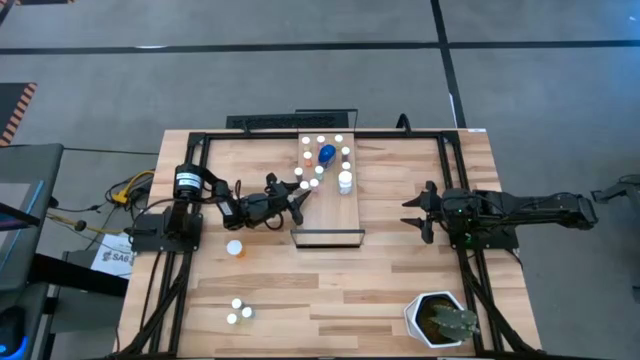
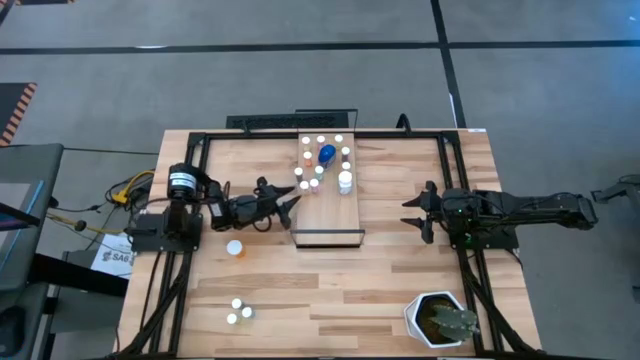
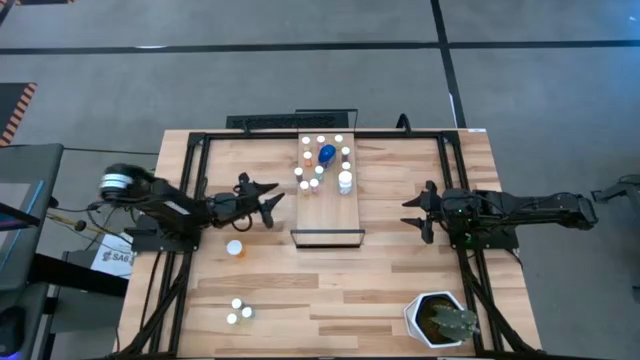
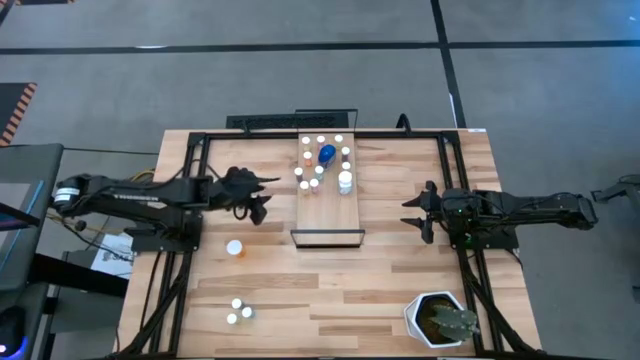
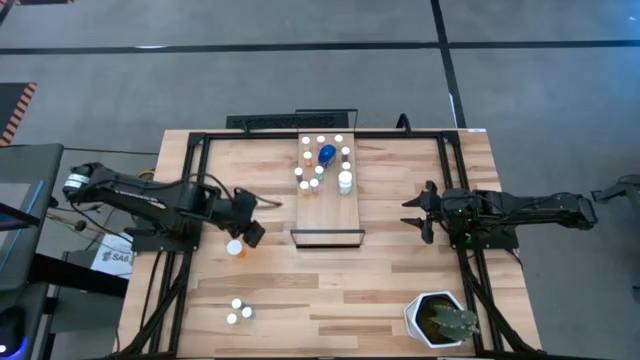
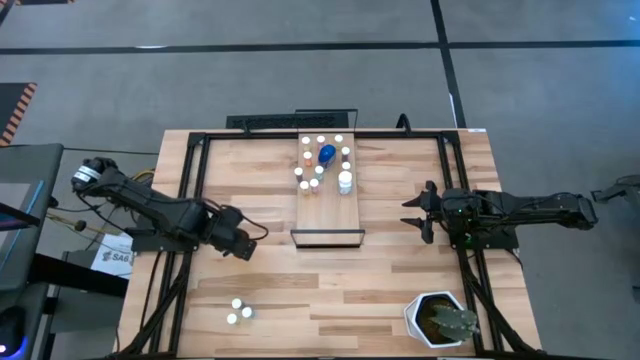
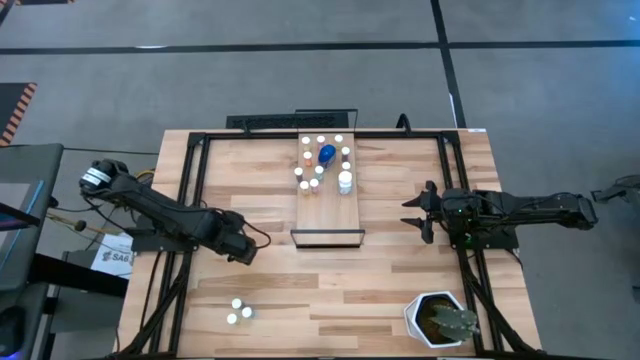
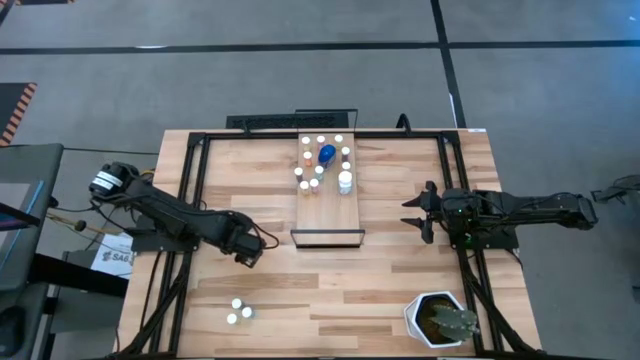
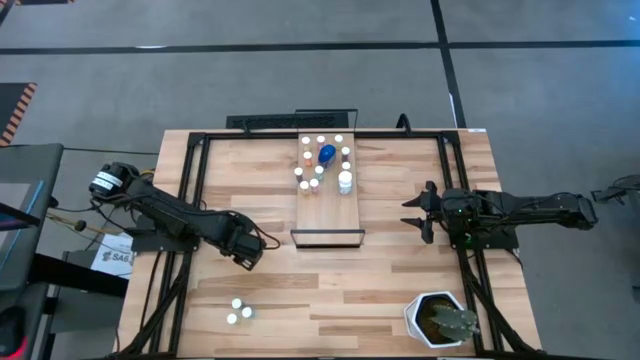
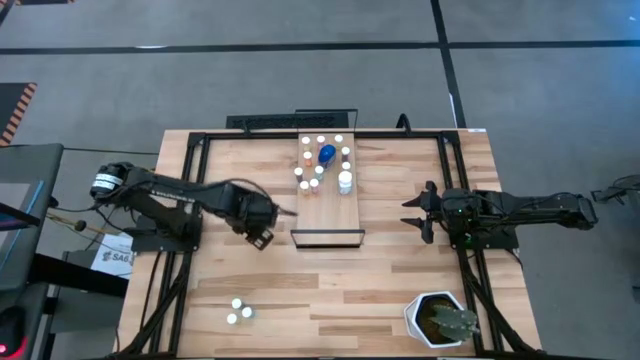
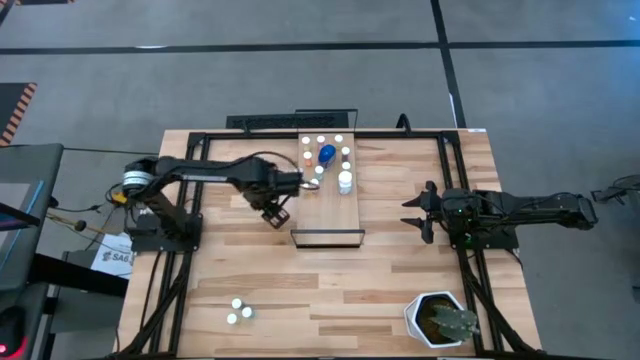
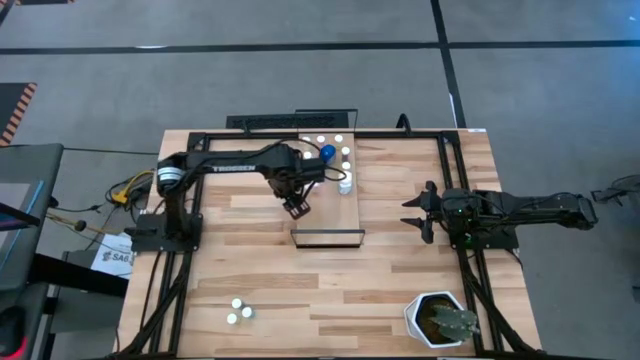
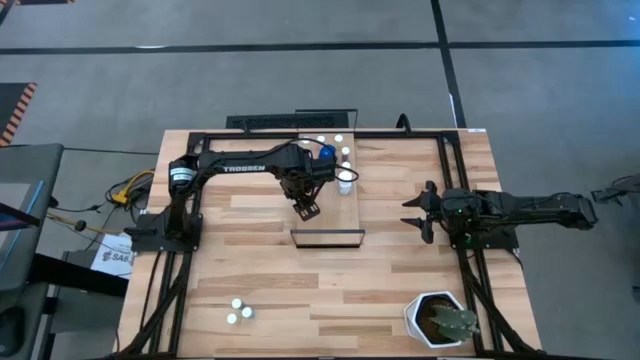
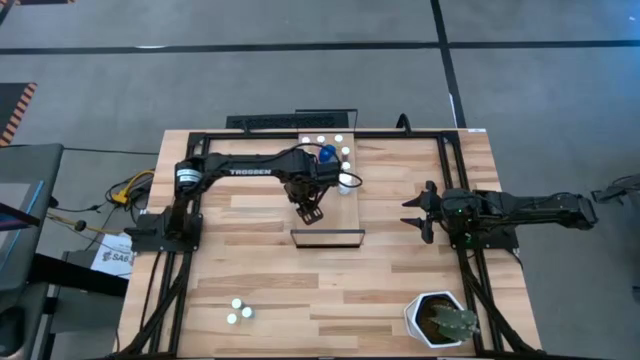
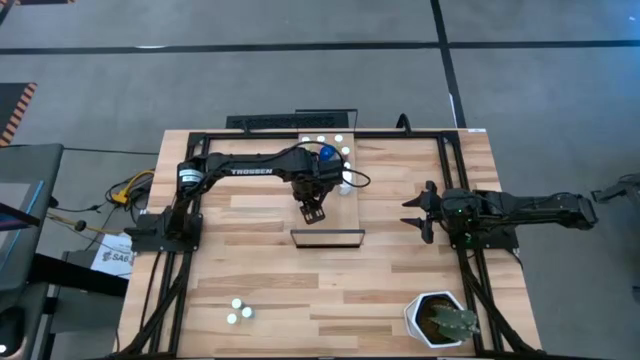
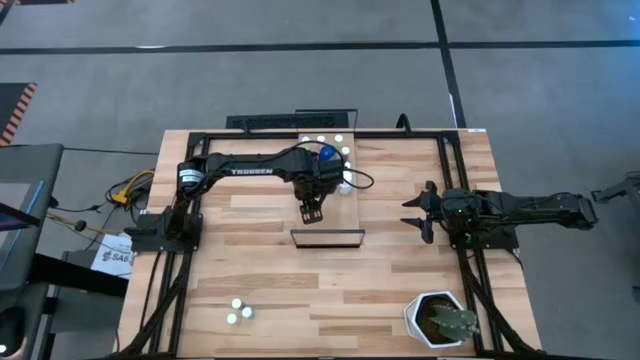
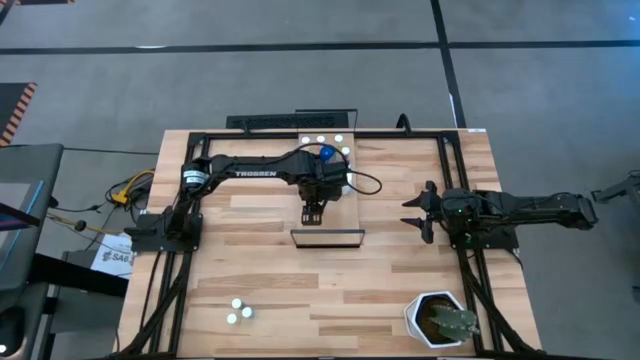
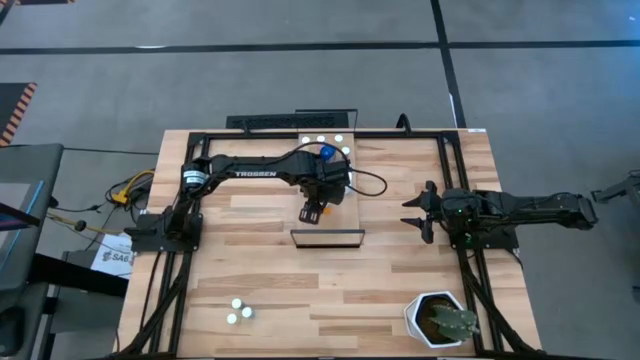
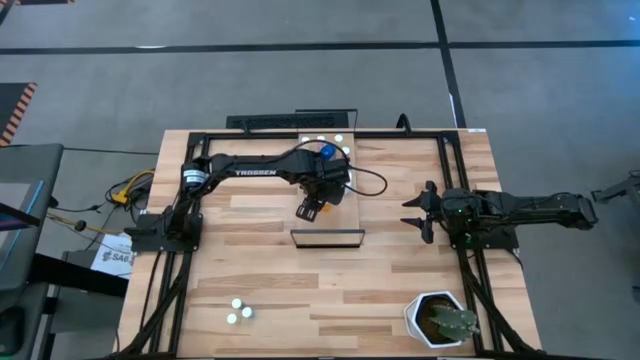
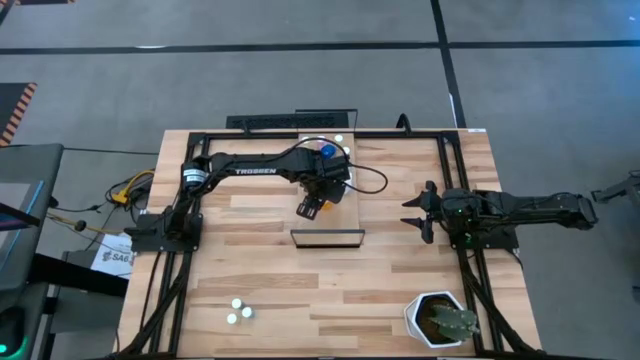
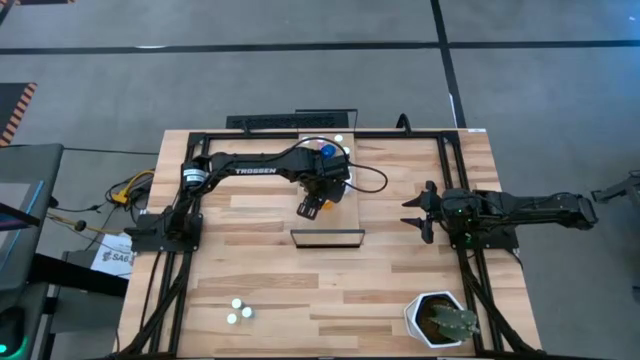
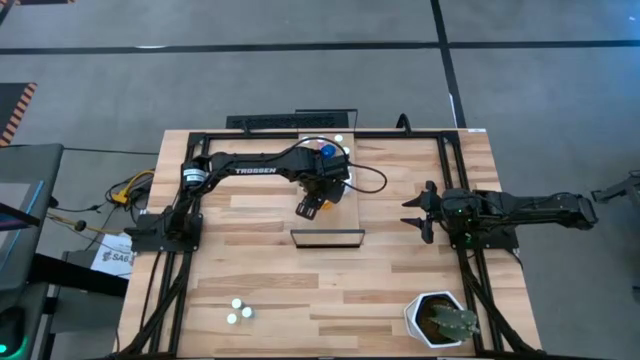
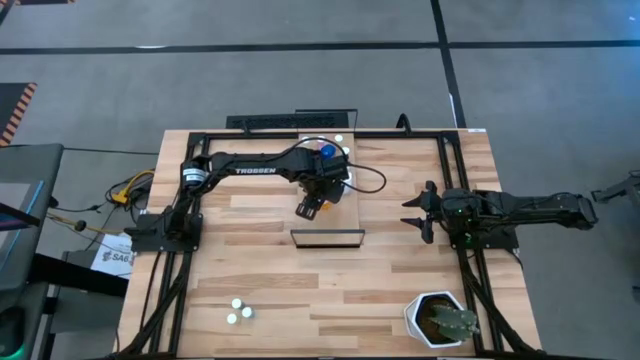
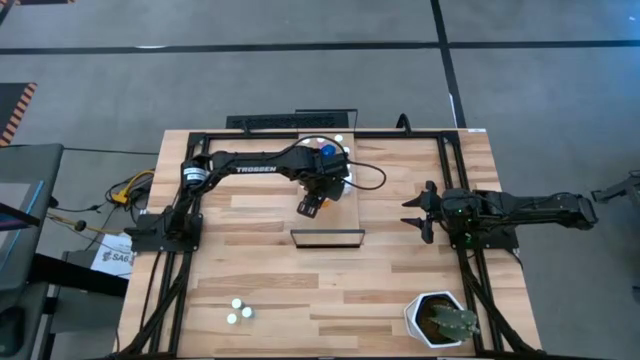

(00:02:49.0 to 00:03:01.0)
Task: Pick and place medicine bottles onto shelf by color
Put the big orange pill bottle on the shelf

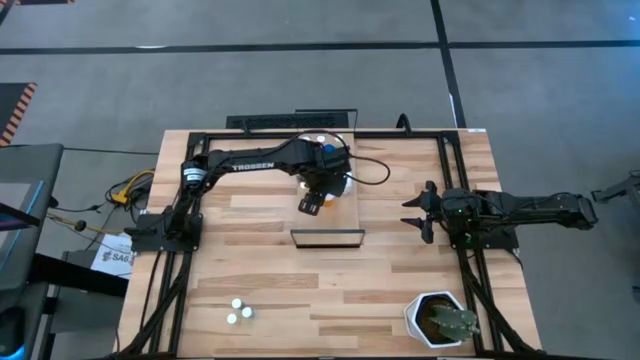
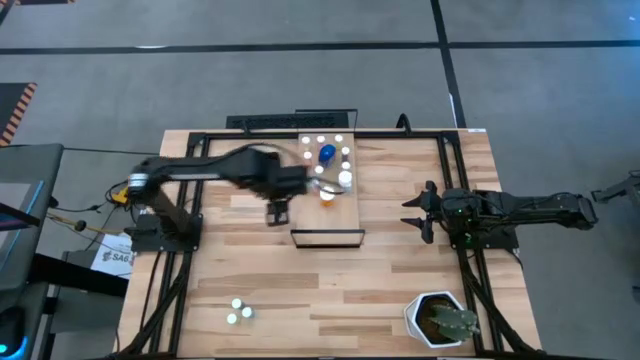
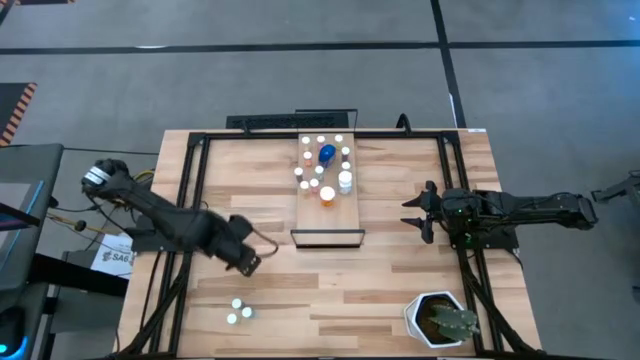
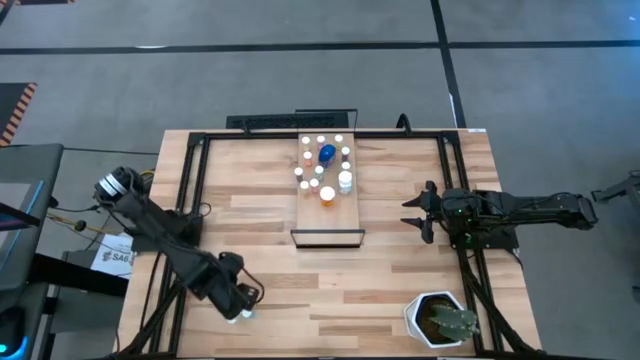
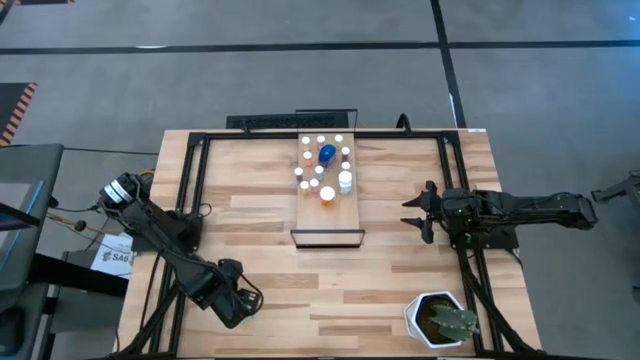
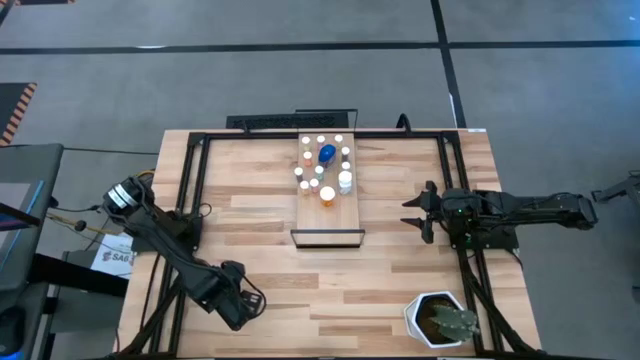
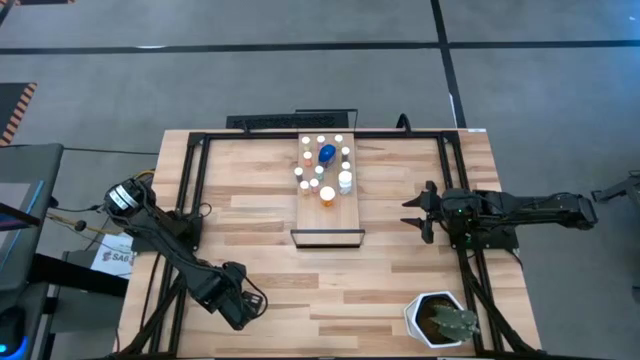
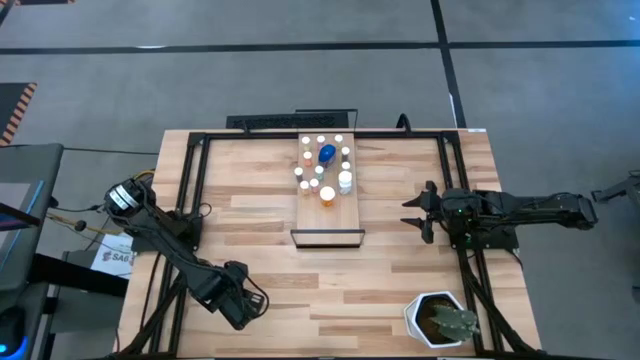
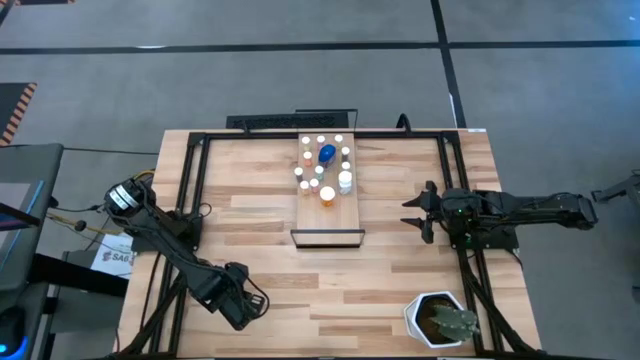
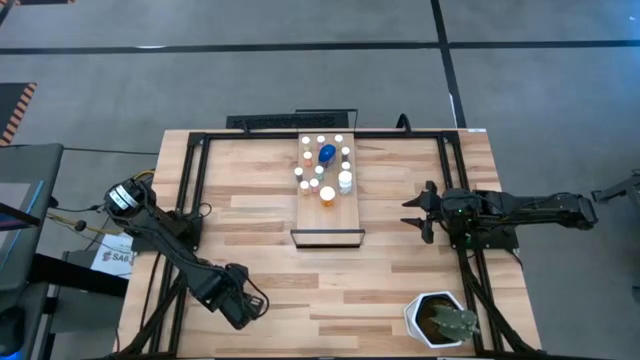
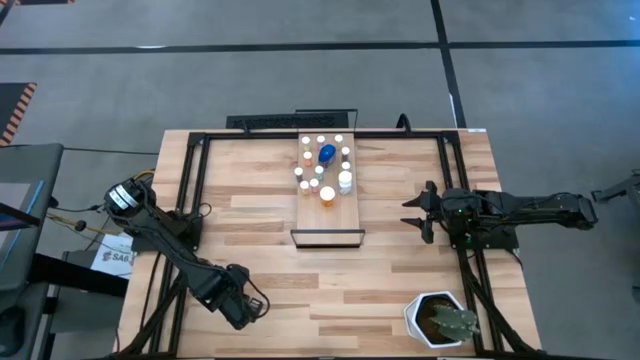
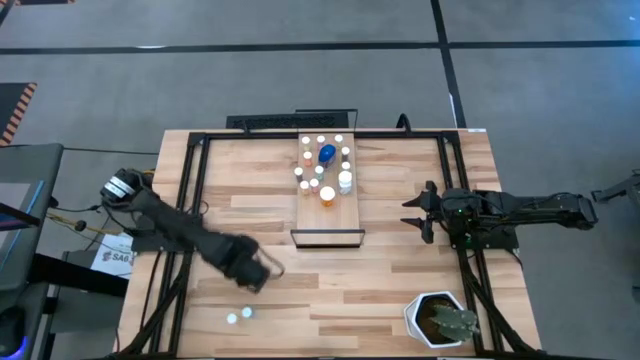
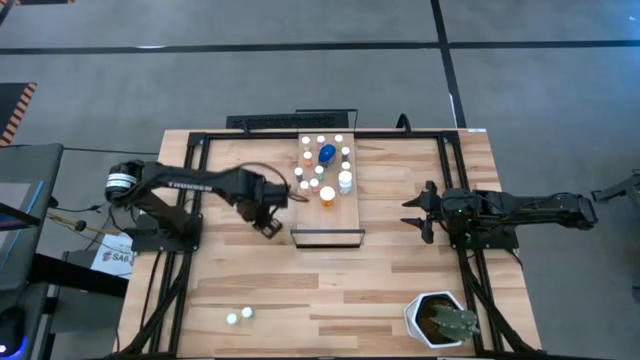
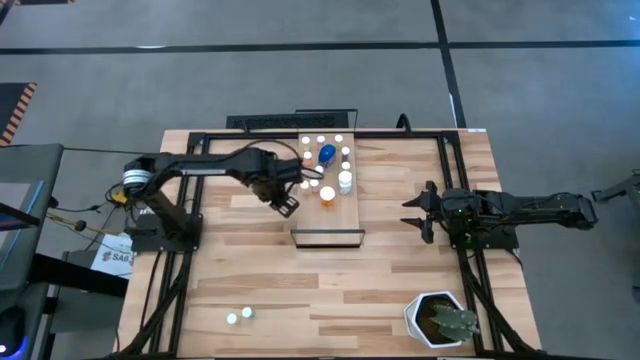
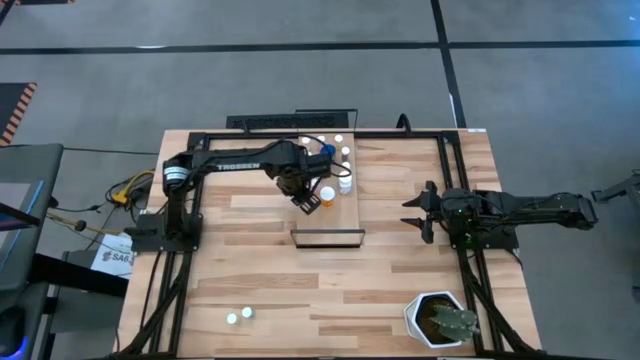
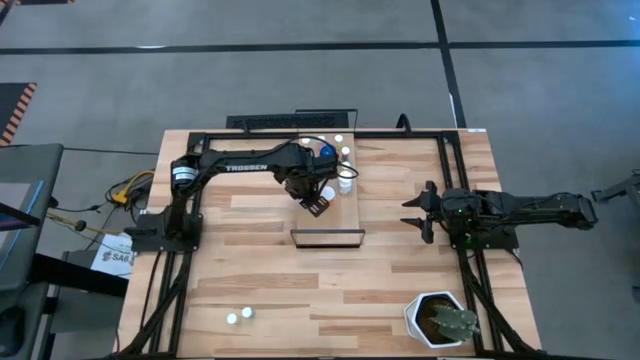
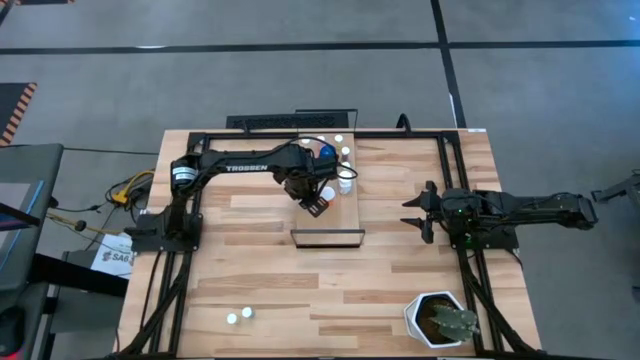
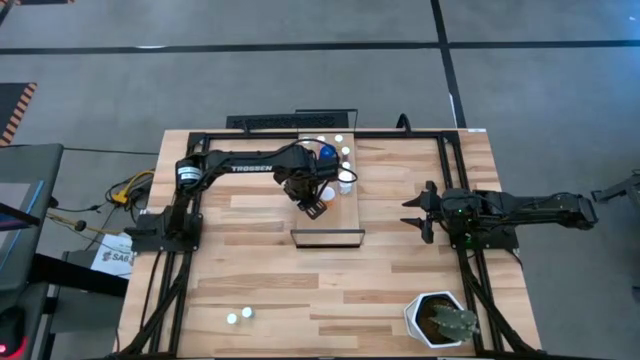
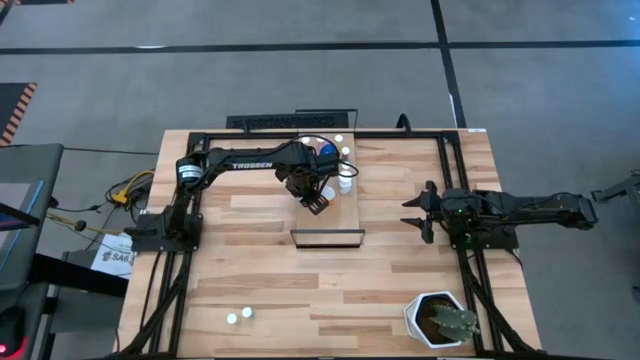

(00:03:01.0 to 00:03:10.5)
Put the blue pill bottle on the shelf

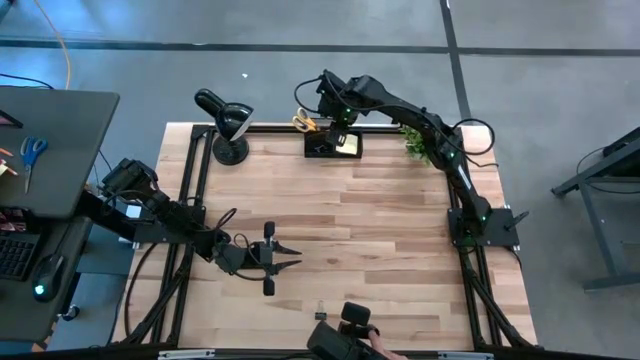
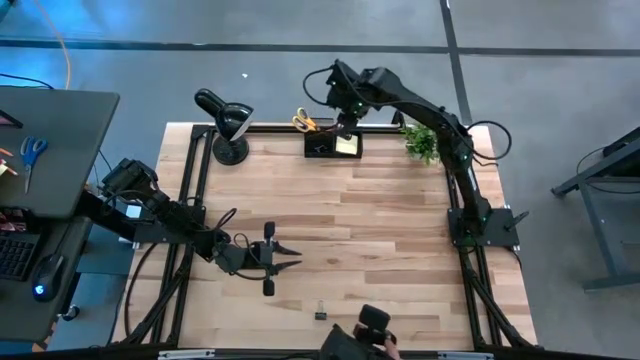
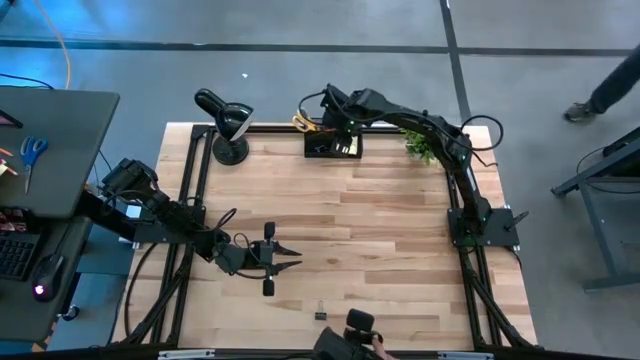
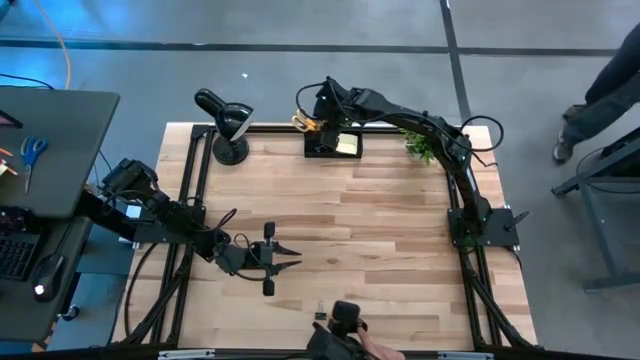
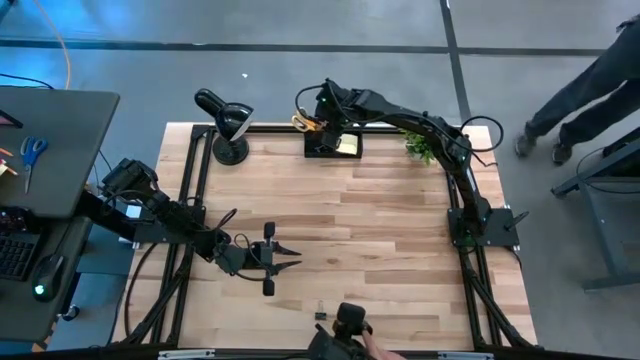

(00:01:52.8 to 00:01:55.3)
Task: Pick and place office supplies into organizer
Adjust the orange pencil in the black desk organizer
